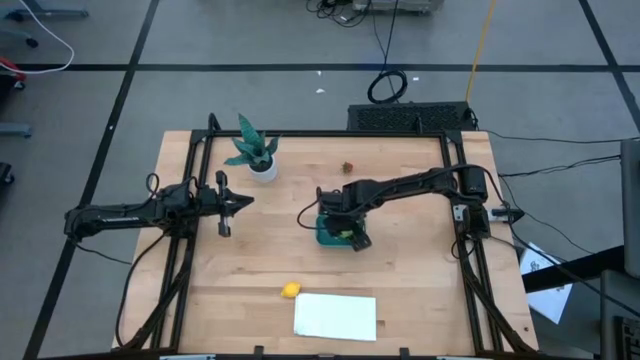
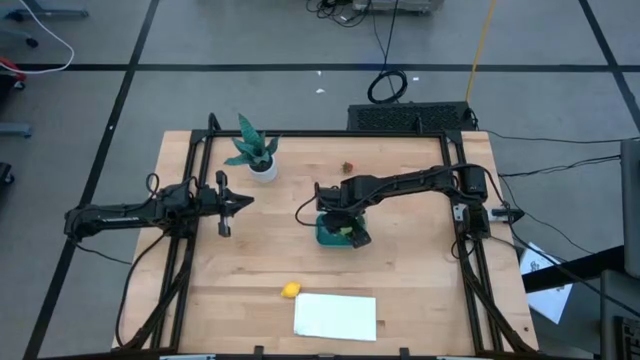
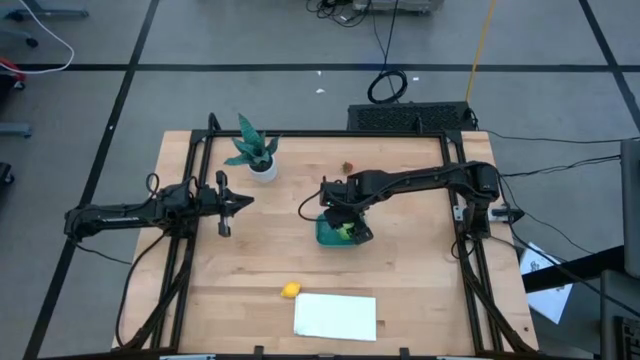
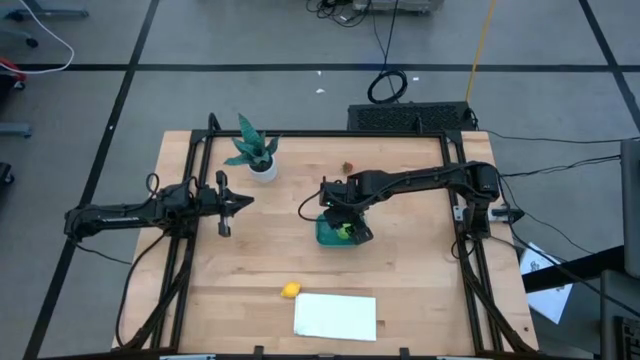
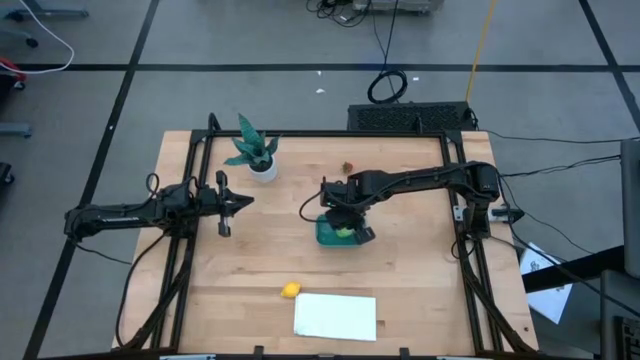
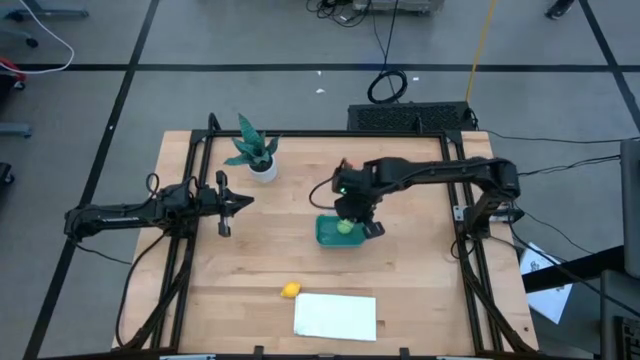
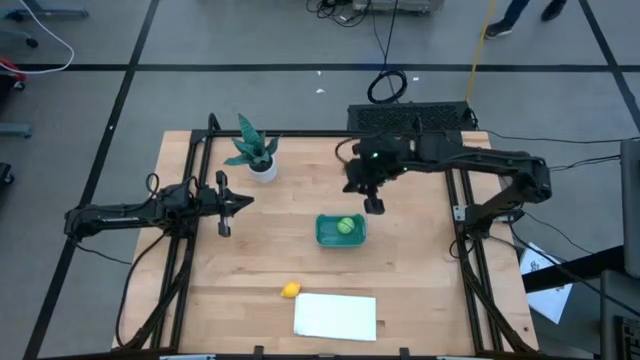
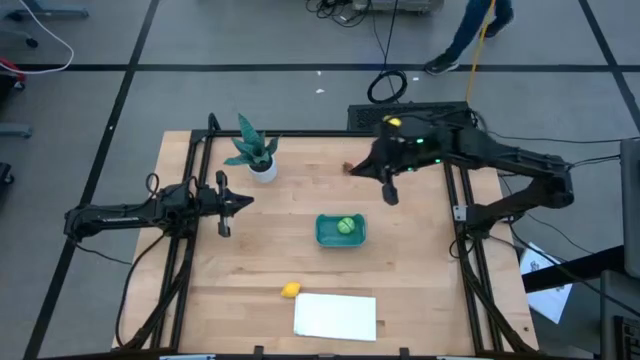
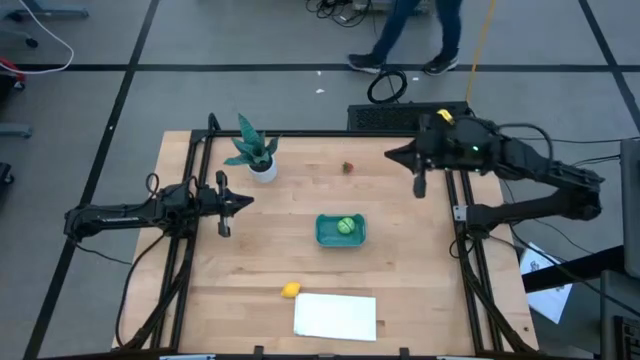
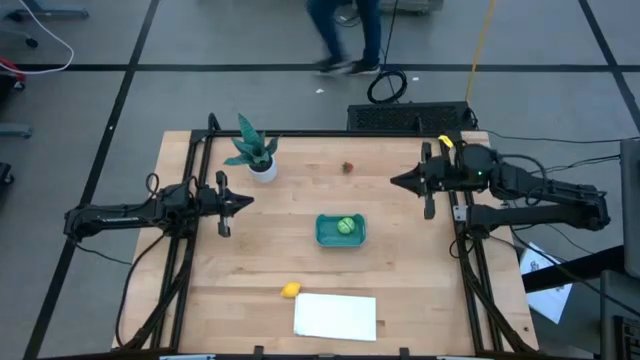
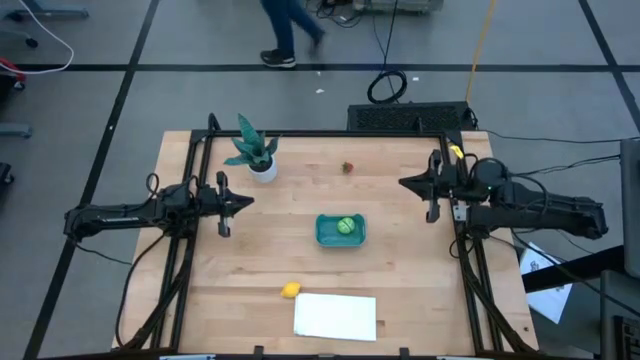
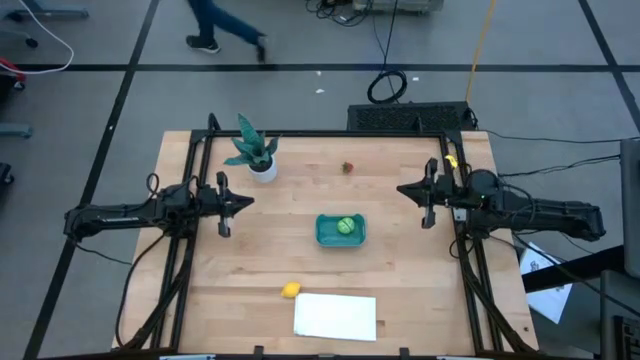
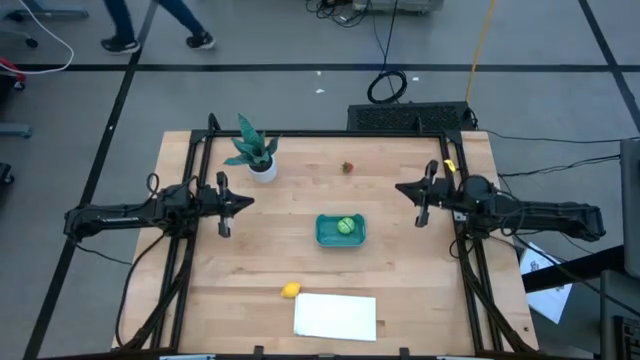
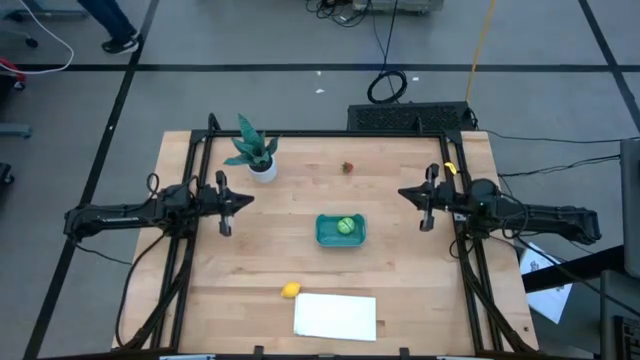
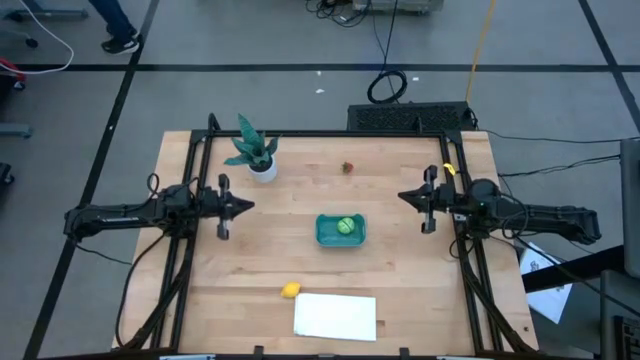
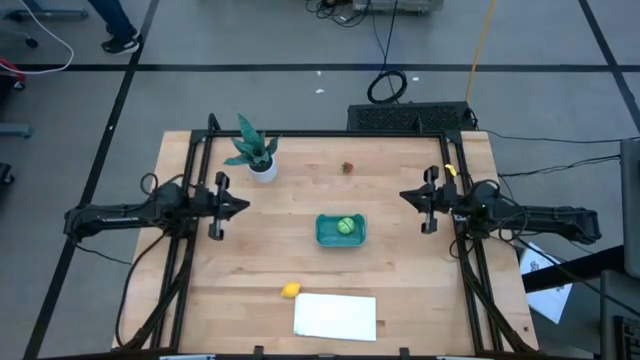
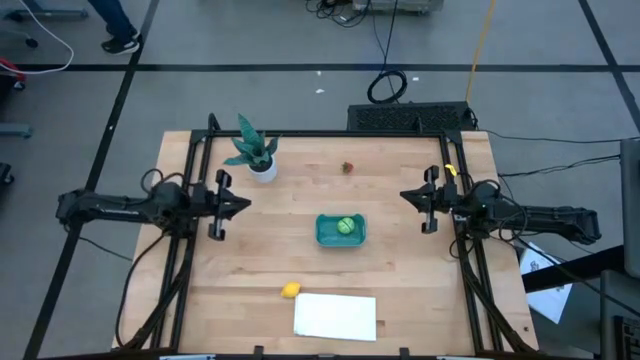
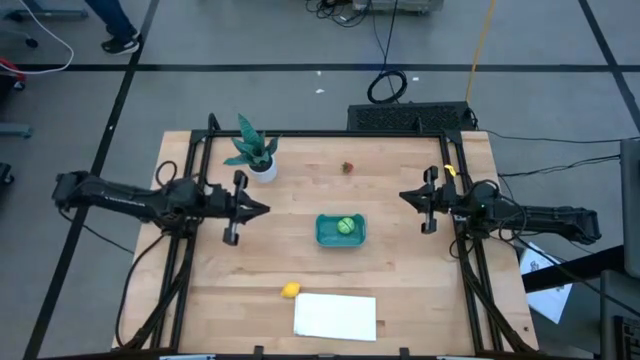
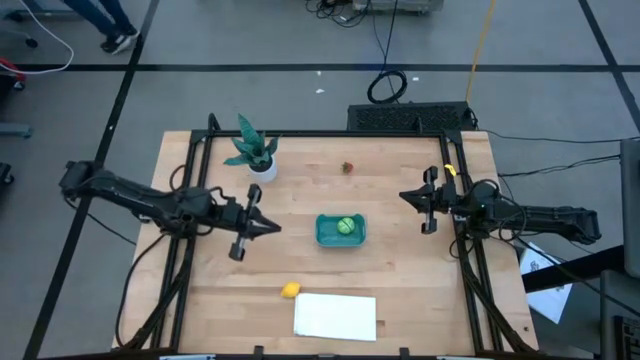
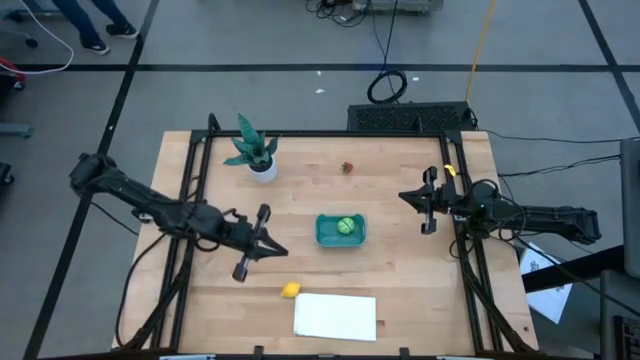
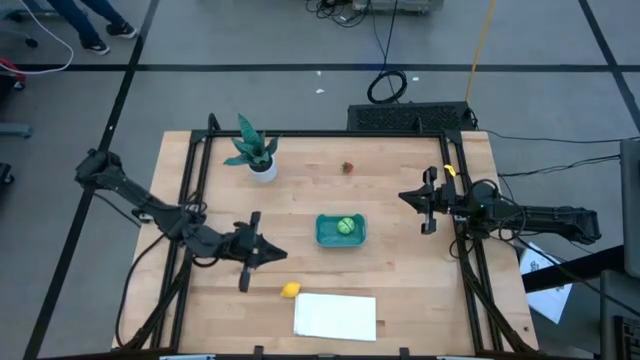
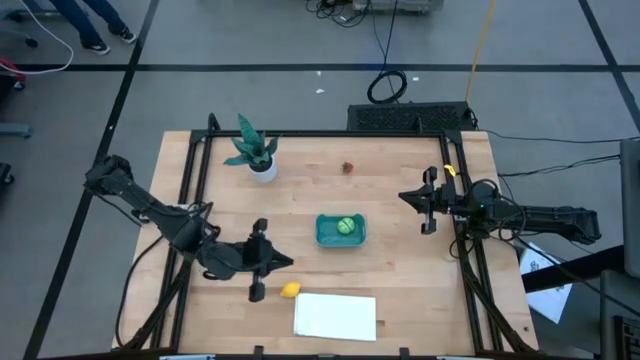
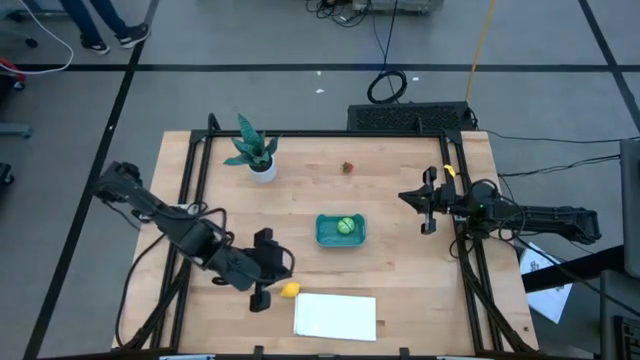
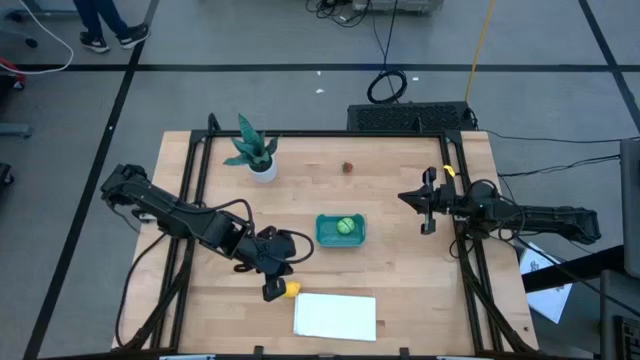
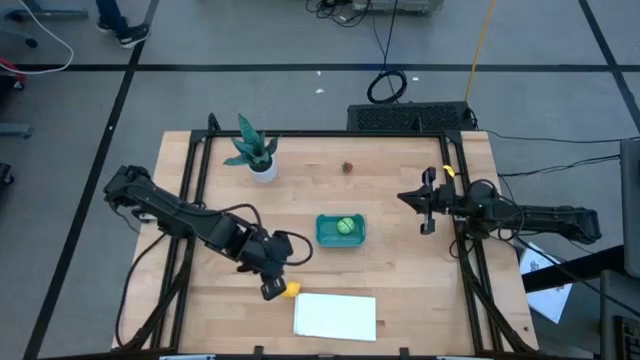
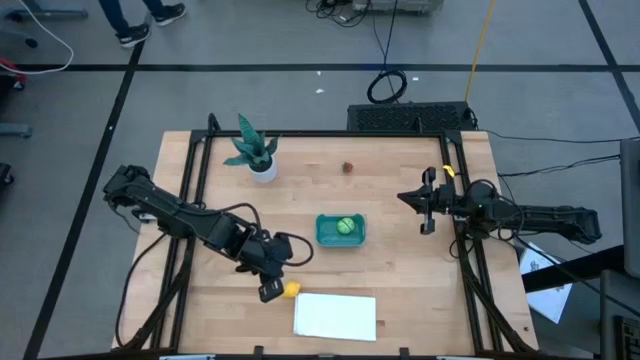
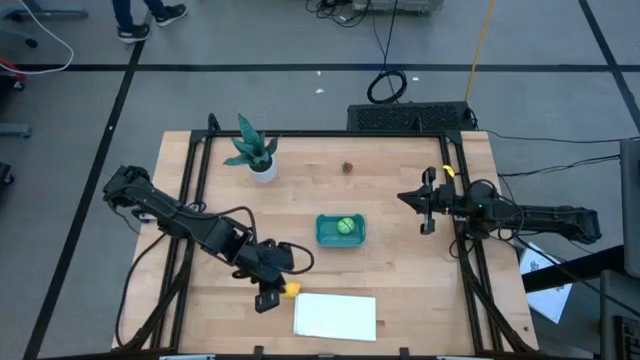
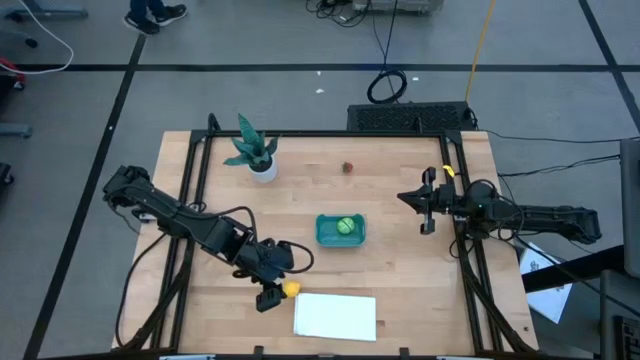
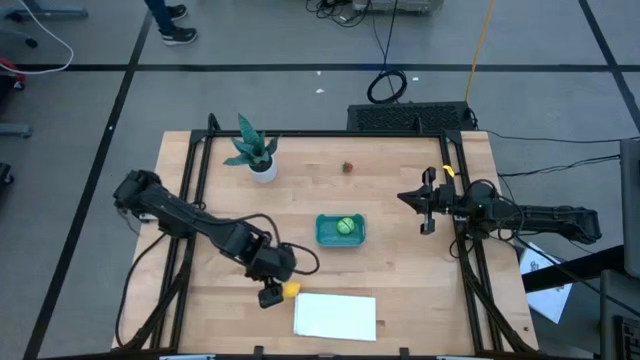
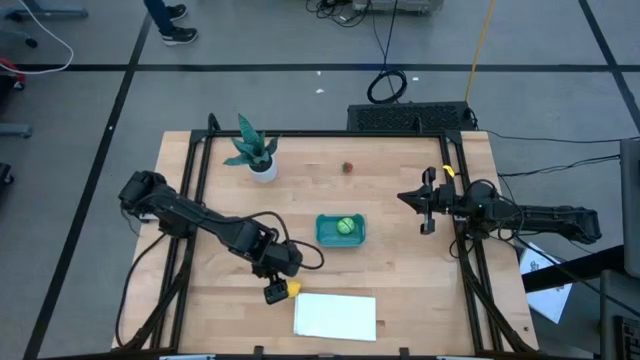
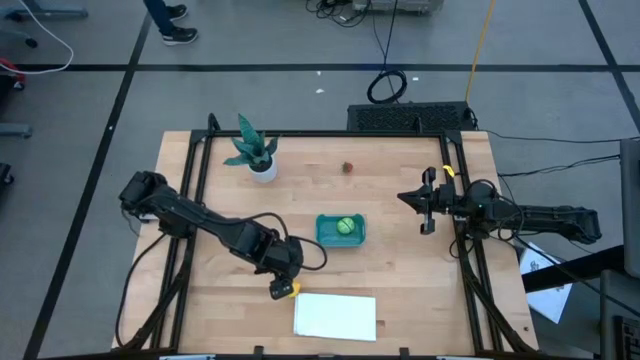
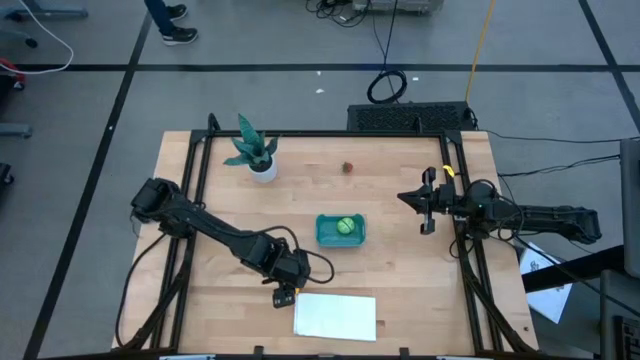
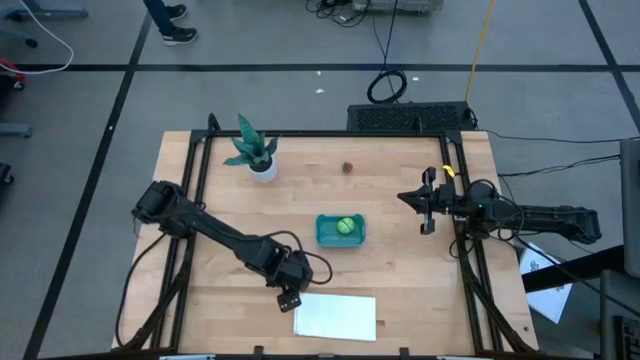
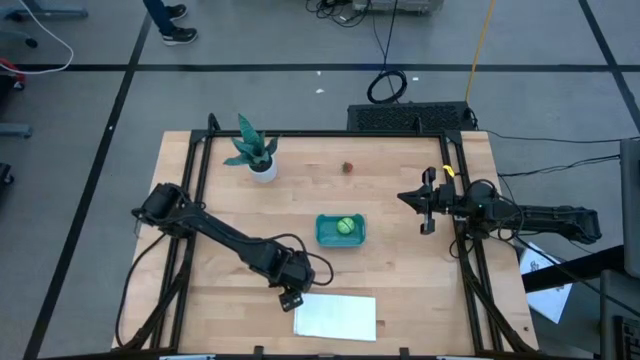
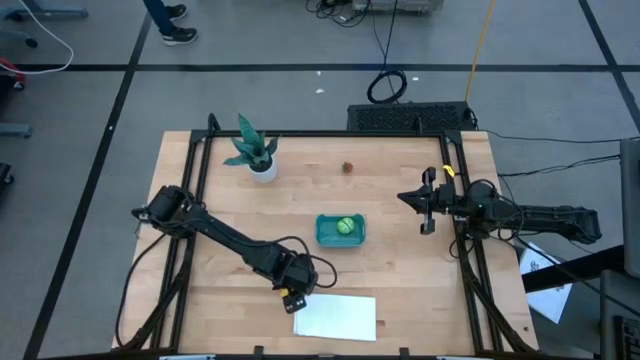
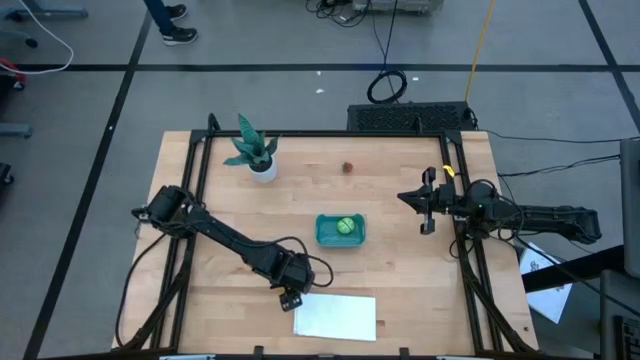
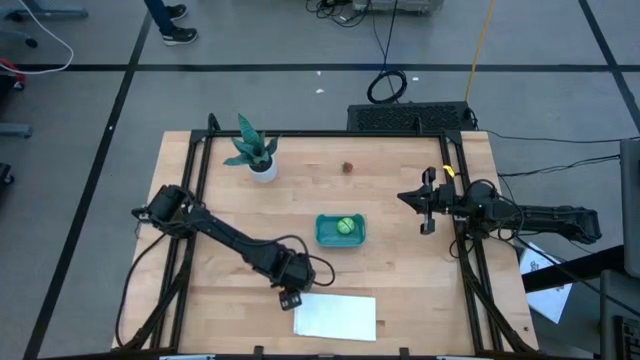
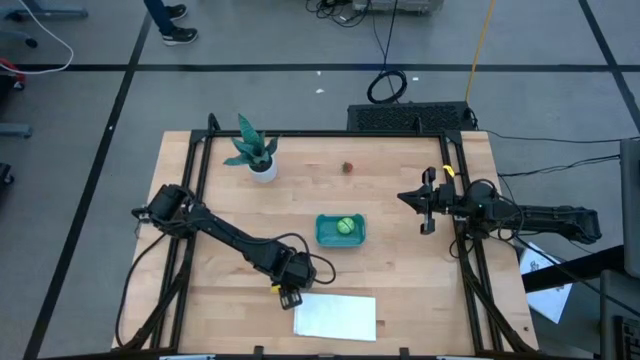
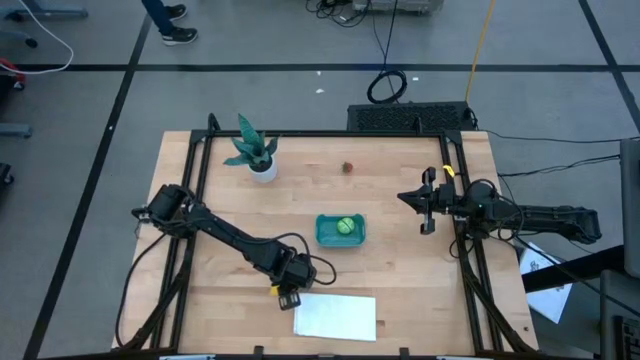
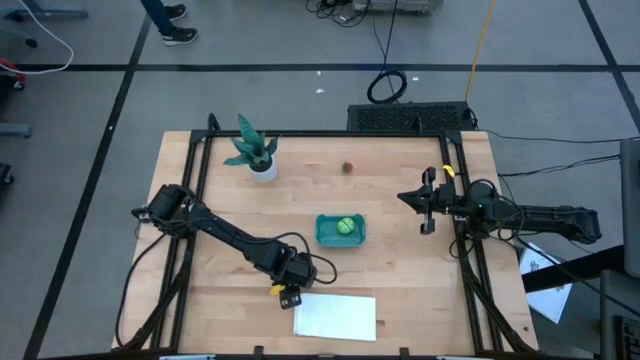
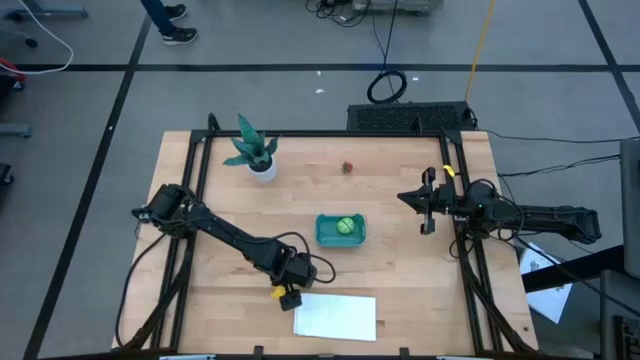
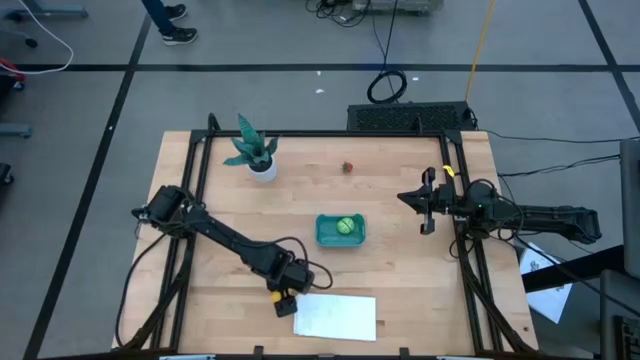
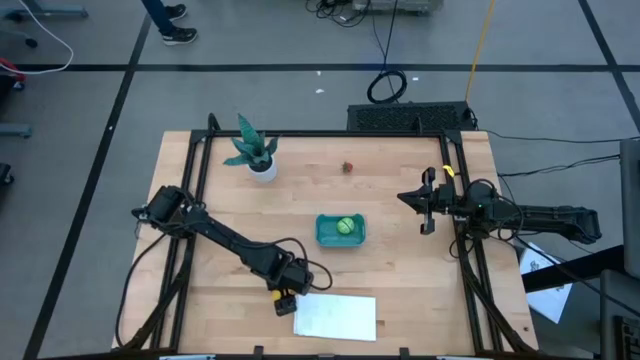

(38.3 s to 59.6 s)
Task: Pick and placing Produce into tupperware
Put the yellow lemon into the blue bin
